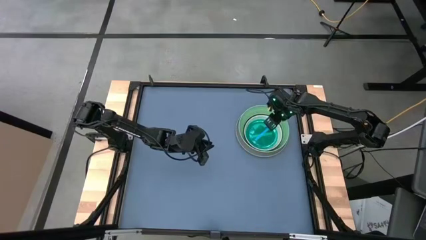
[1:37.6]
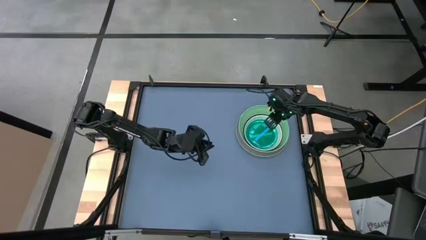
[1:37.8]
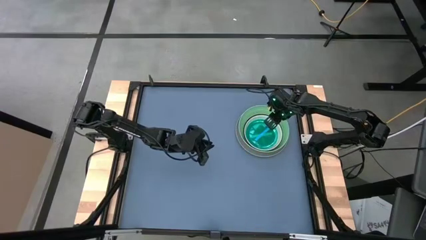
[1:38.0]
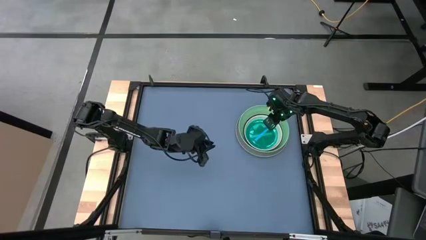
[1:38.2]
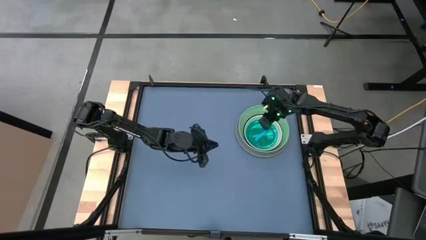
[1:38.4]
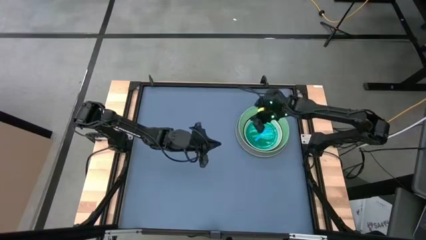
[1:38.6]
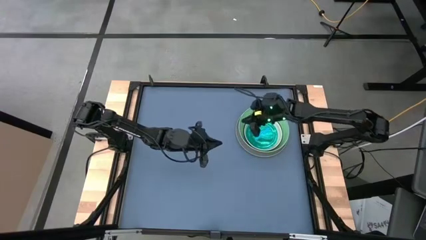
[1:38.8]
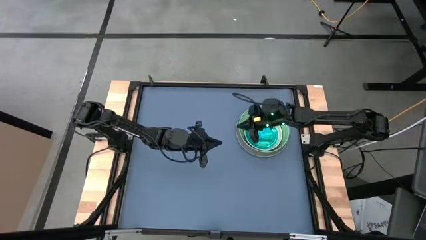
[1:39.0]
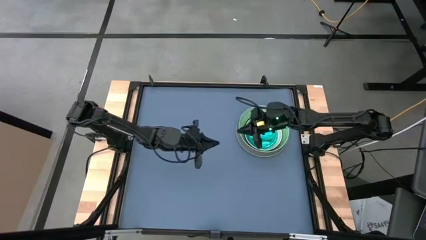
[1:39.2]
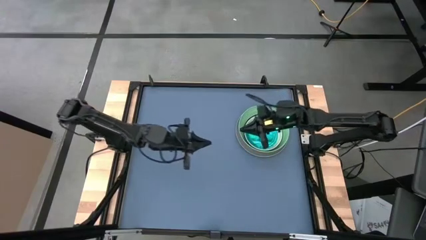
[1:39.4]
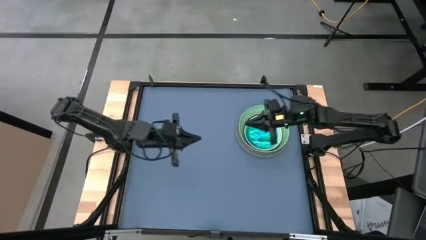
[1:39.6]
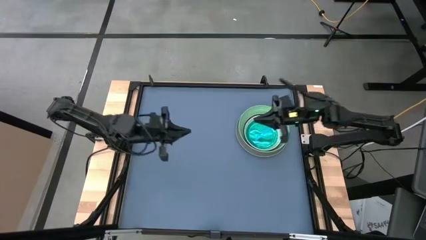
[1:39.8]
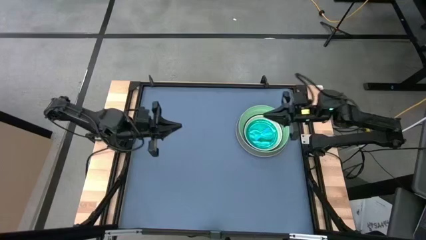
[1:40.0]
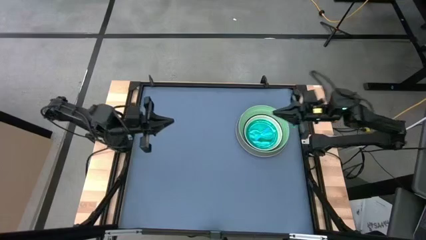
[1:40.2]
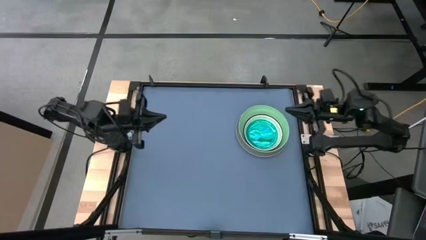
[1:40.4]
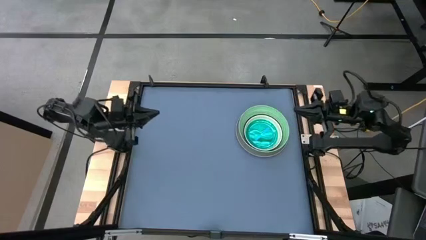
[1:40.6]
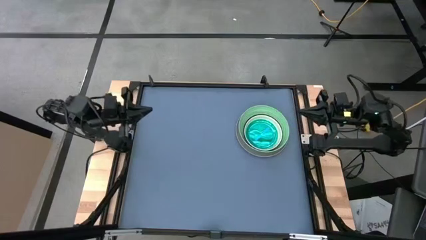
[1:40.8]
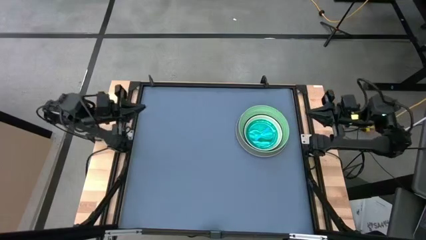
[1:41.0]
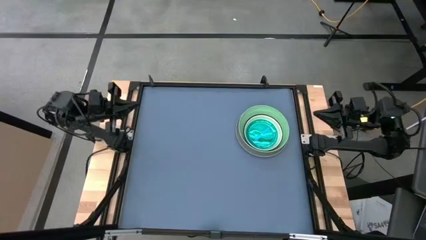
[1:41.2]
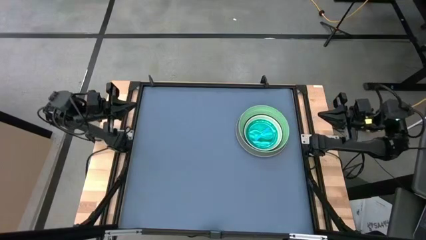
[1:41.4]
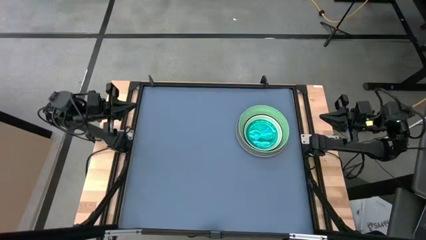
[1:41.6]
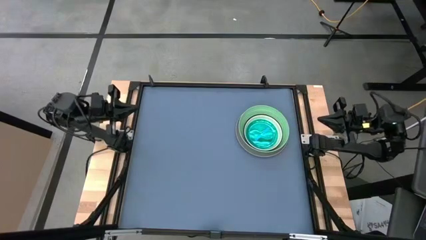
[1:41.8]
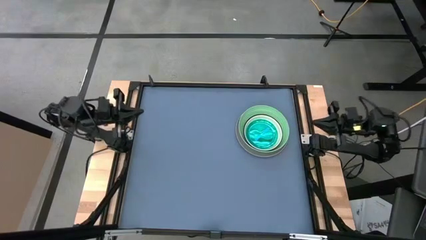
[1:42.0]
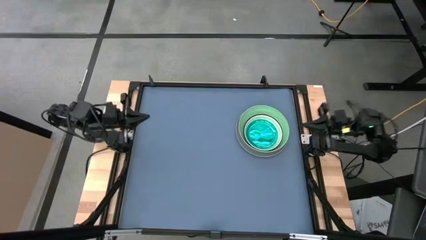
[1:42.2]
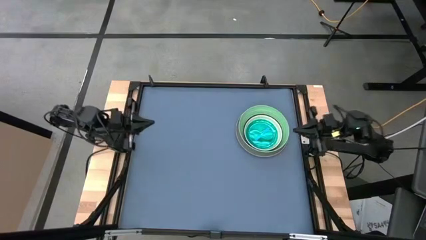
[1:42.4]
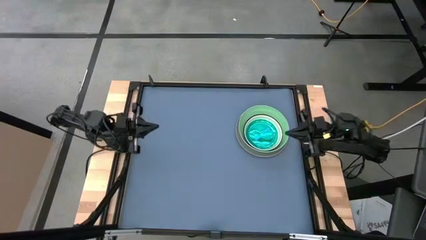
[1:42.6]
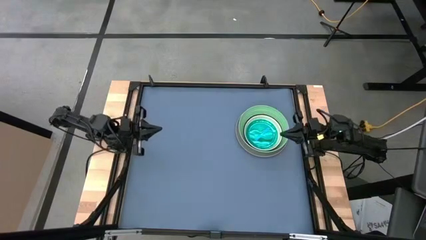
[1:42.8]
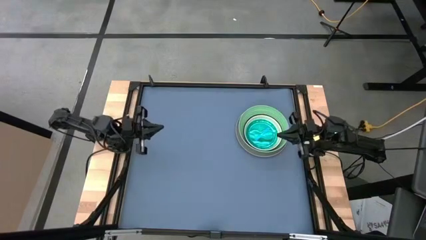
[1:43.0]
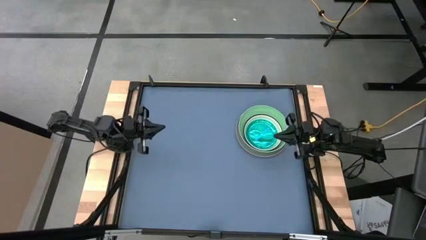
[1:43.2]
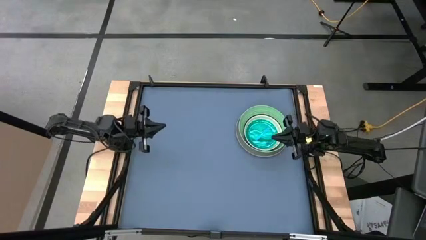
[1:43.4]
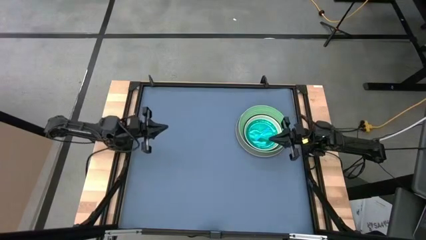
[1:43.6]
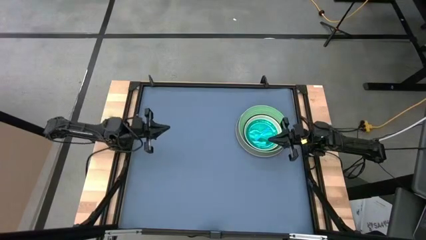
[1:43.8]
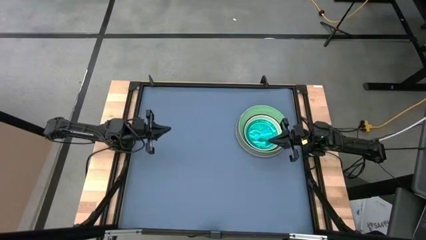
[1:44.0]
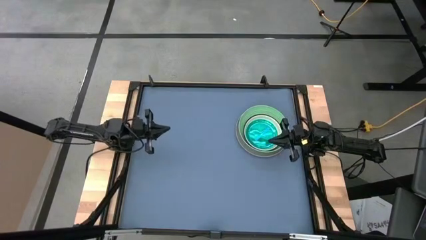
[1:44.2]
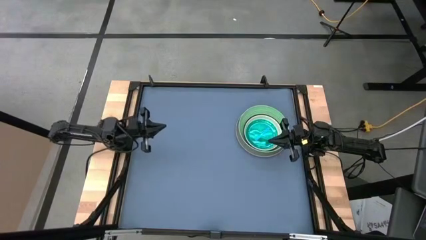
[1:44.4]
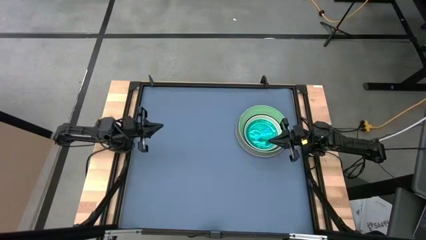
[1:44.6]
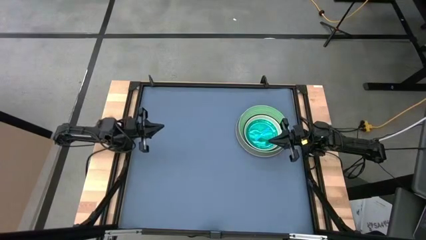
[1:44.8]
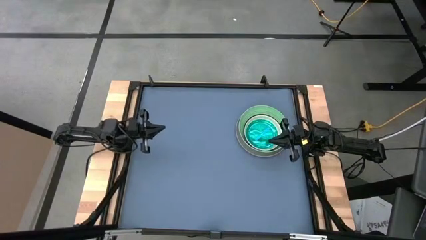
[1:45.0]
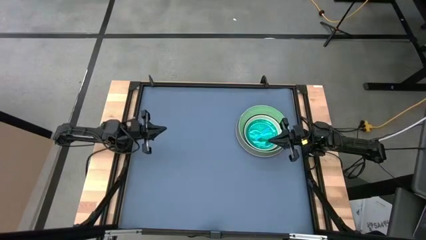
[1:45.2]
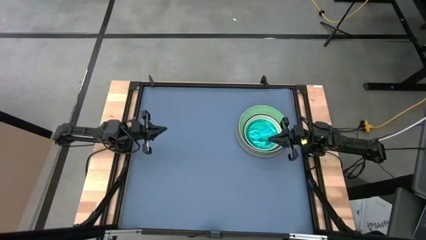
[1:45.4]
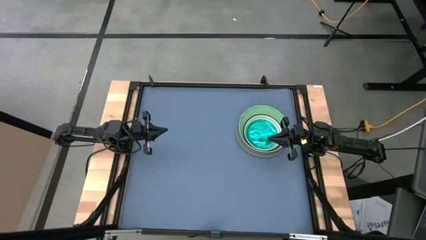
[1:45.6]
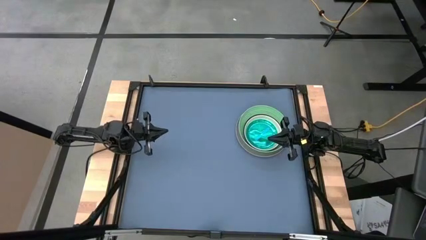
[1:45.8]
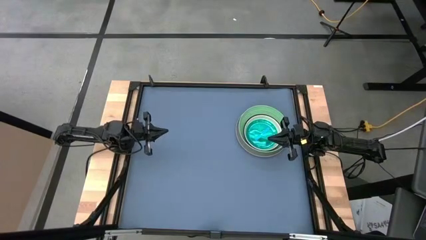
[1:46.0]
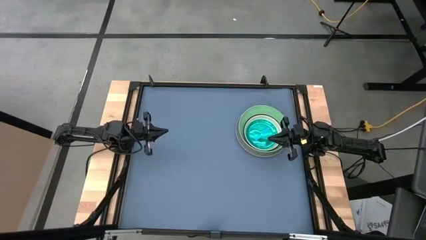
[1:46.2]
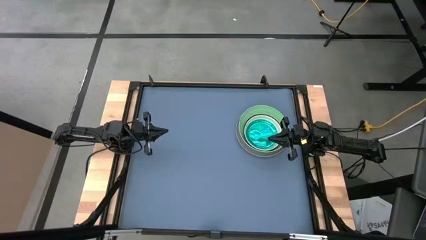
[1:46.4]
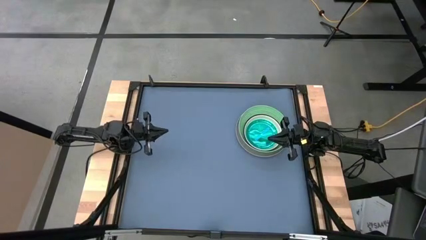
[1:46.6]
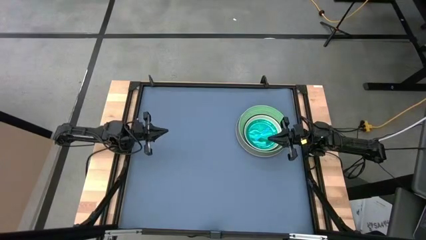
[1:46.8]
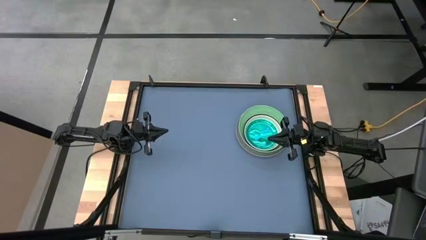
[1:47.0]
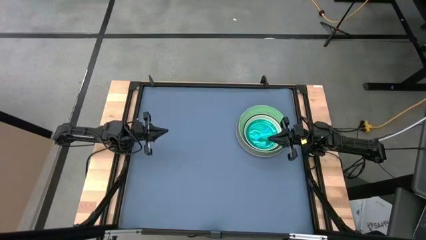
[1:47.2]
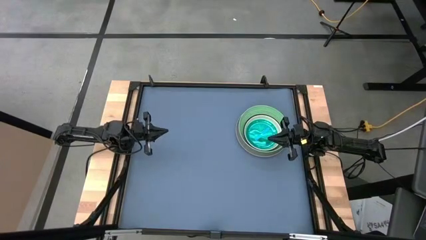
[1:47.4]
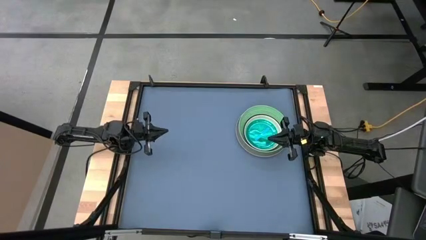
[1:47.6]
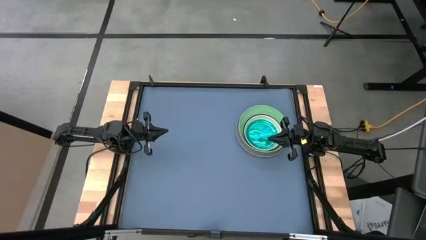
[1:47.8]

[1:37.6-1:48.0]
Task: Stack plastic plates
Return to Home Position
